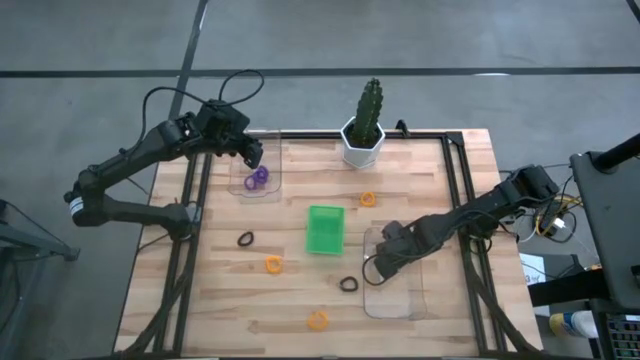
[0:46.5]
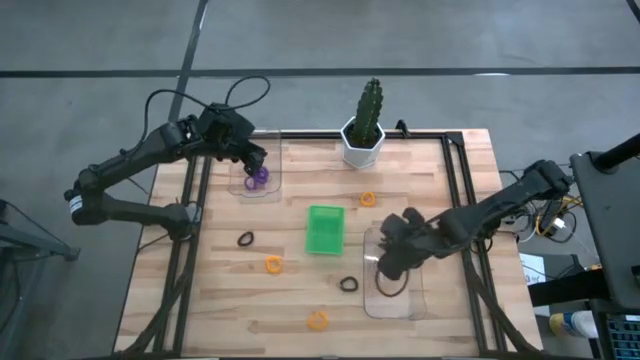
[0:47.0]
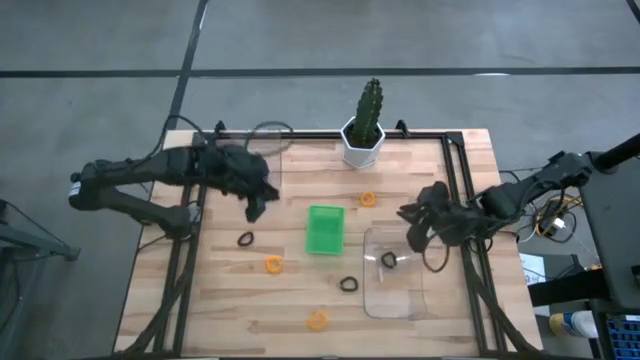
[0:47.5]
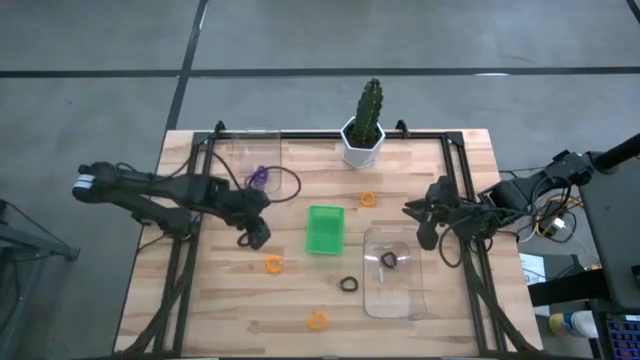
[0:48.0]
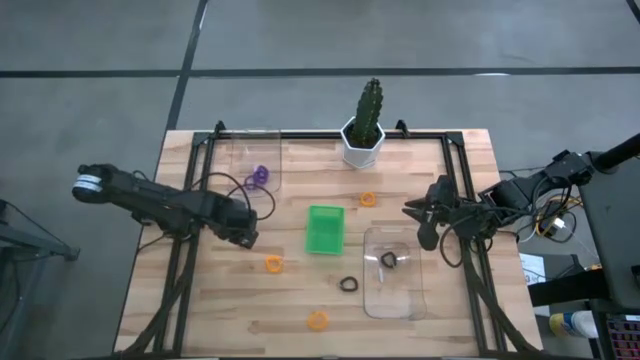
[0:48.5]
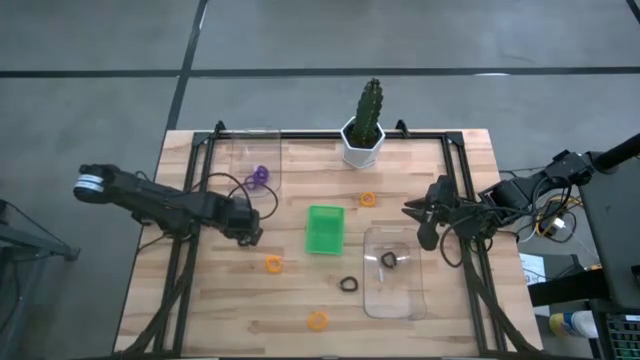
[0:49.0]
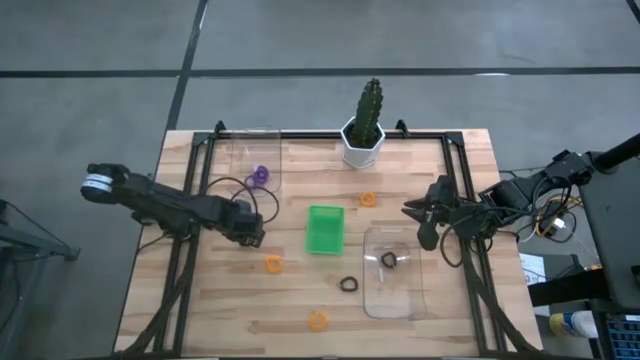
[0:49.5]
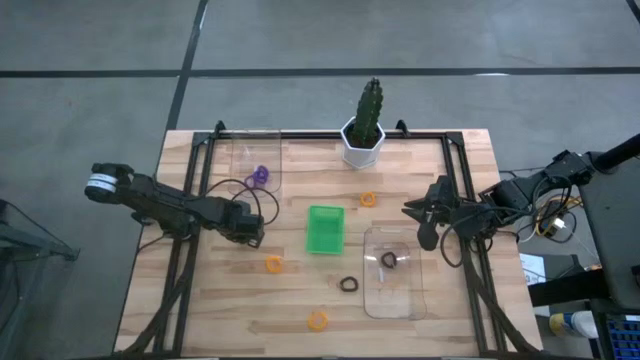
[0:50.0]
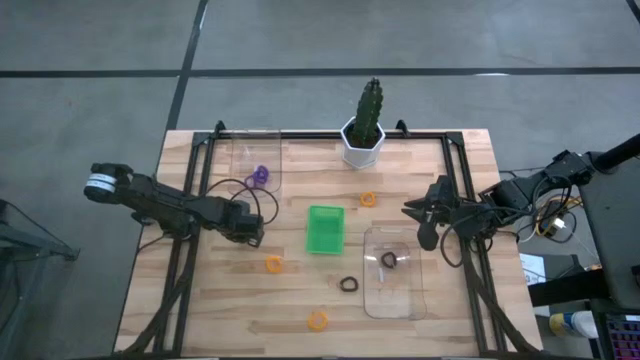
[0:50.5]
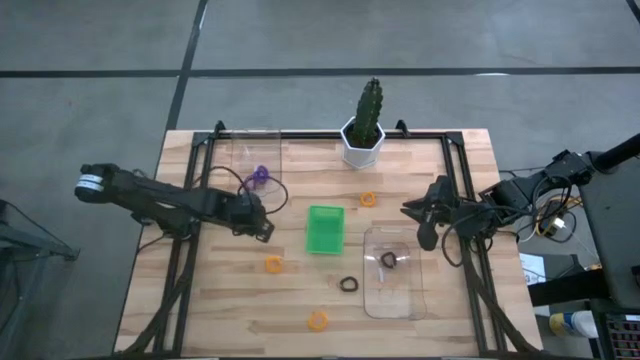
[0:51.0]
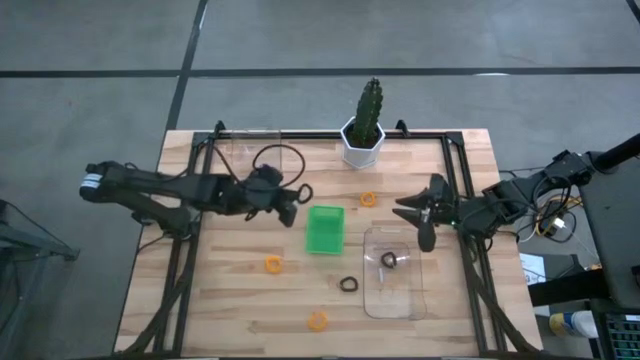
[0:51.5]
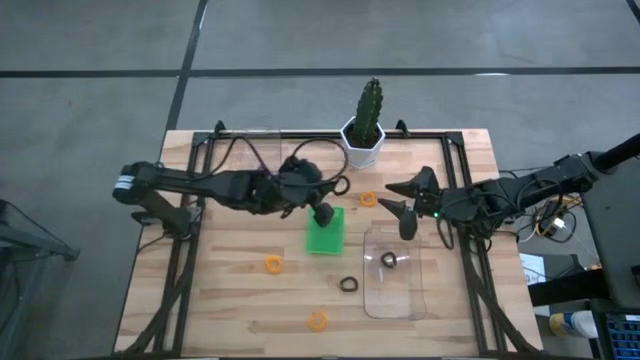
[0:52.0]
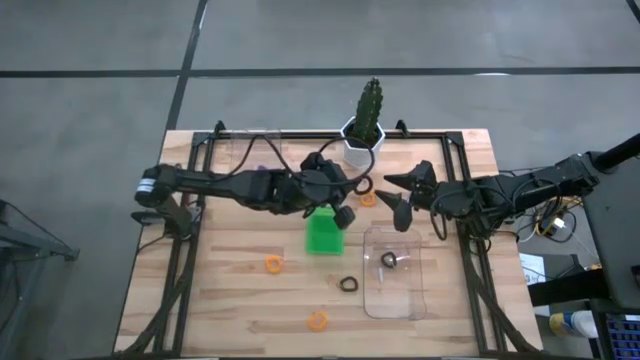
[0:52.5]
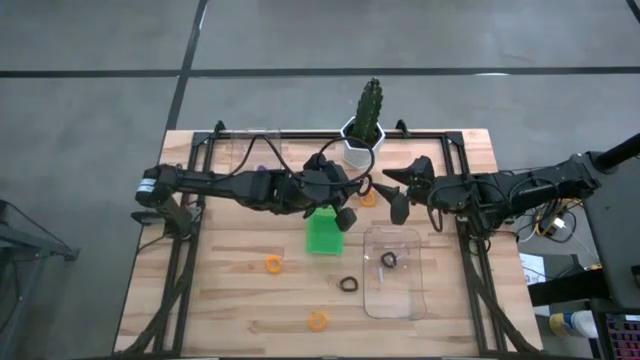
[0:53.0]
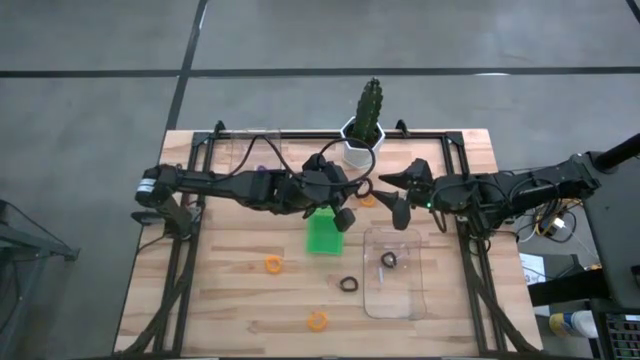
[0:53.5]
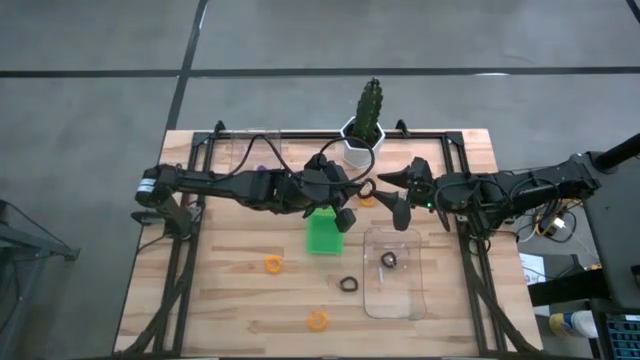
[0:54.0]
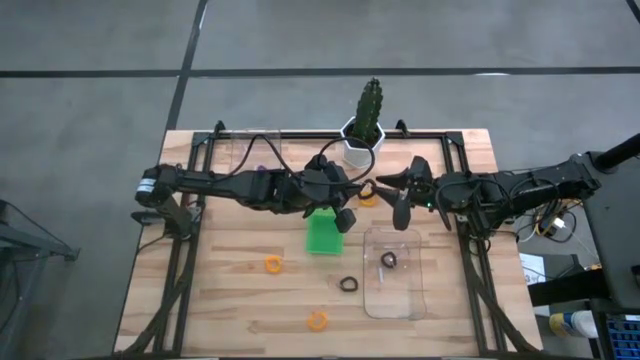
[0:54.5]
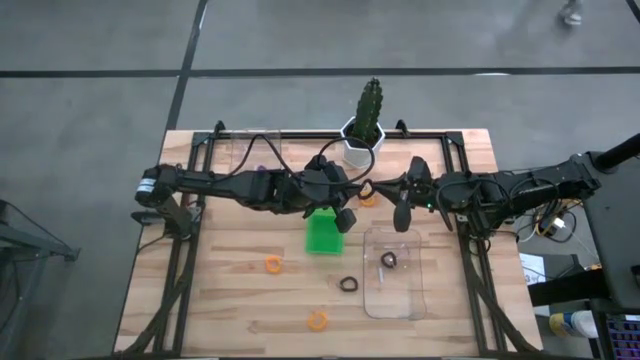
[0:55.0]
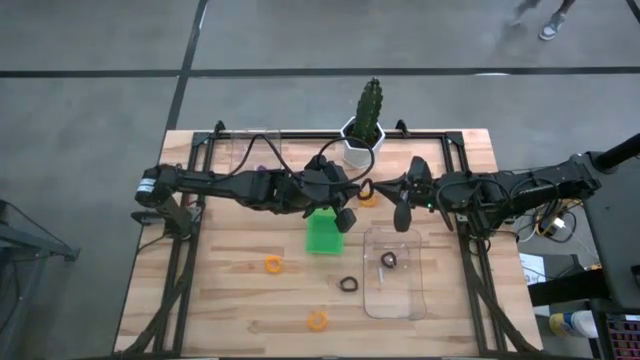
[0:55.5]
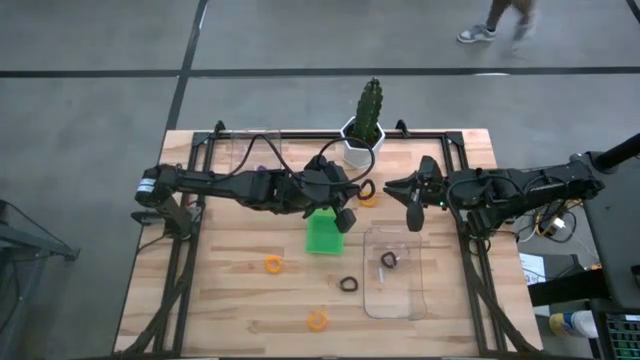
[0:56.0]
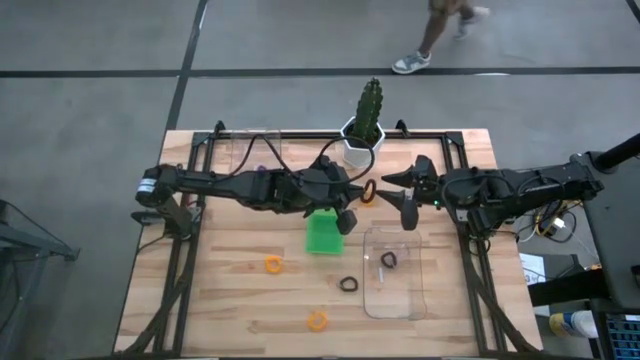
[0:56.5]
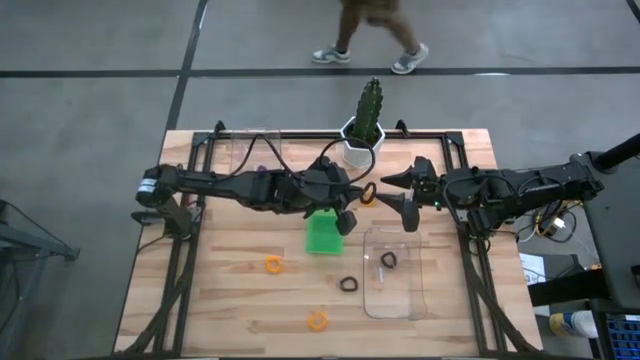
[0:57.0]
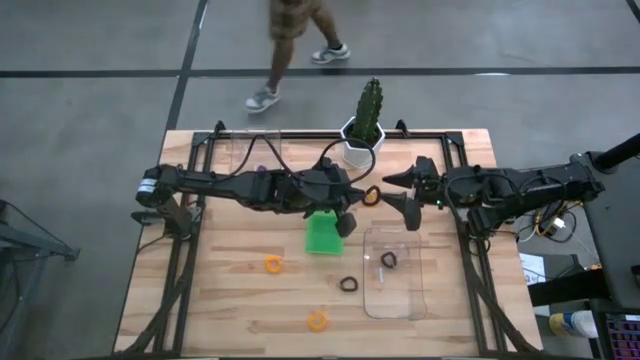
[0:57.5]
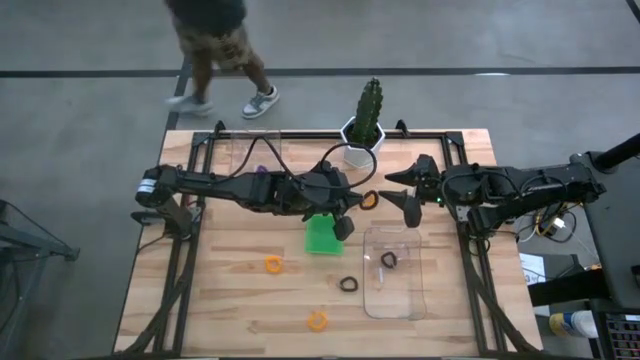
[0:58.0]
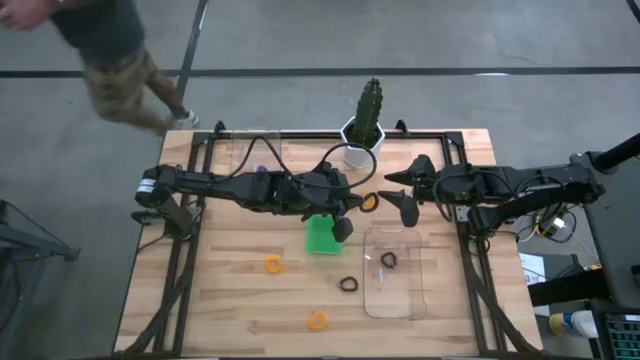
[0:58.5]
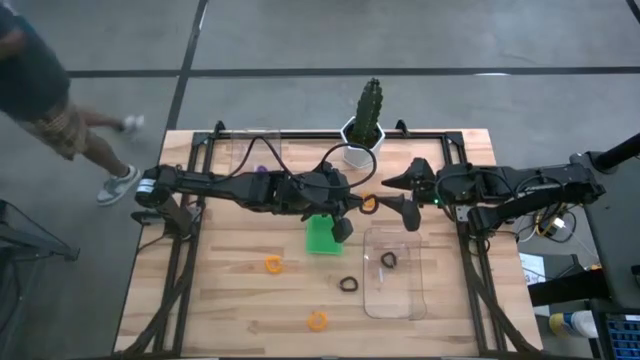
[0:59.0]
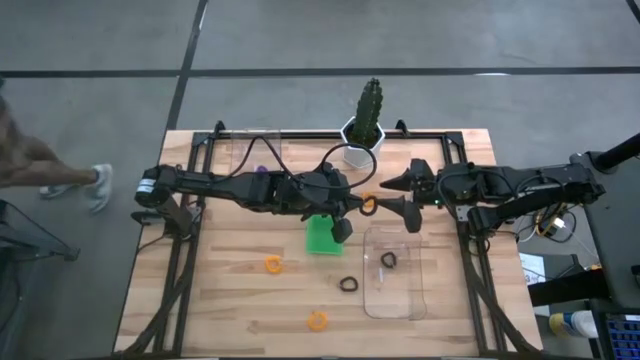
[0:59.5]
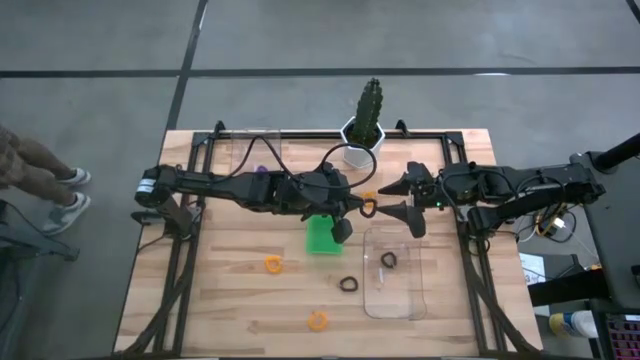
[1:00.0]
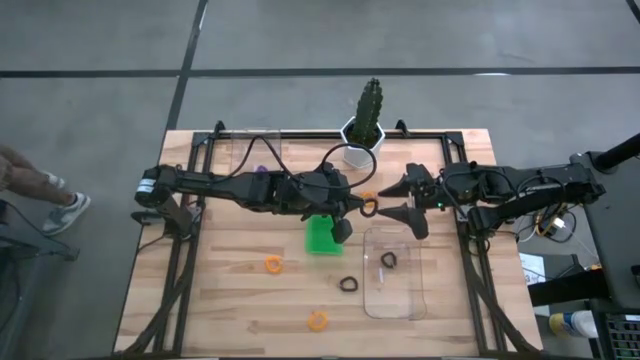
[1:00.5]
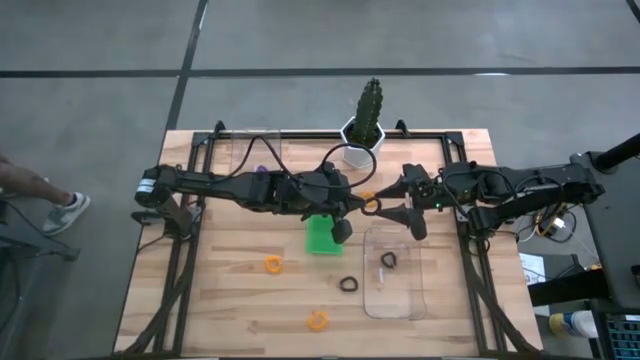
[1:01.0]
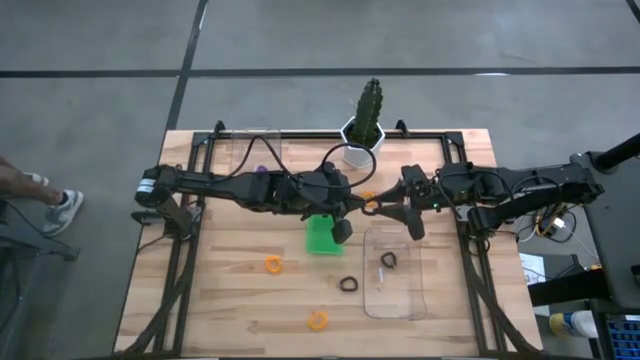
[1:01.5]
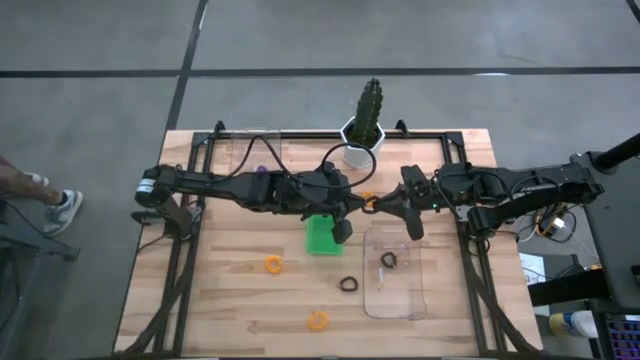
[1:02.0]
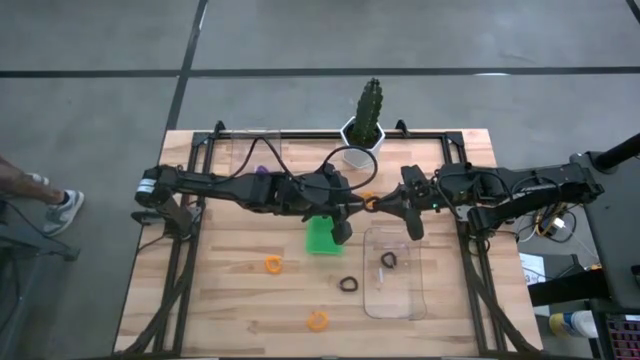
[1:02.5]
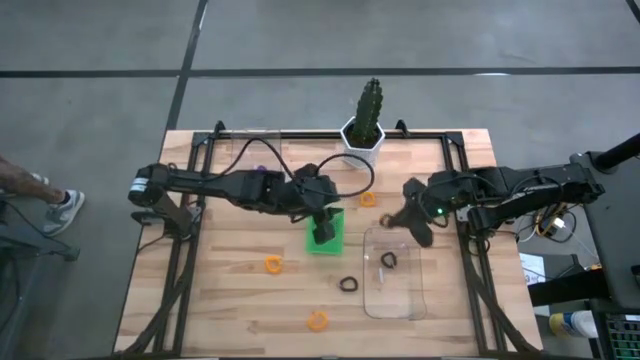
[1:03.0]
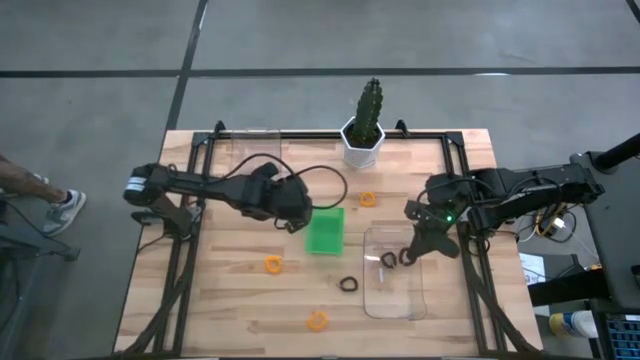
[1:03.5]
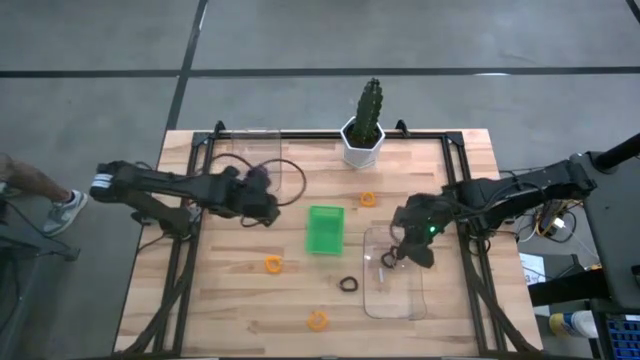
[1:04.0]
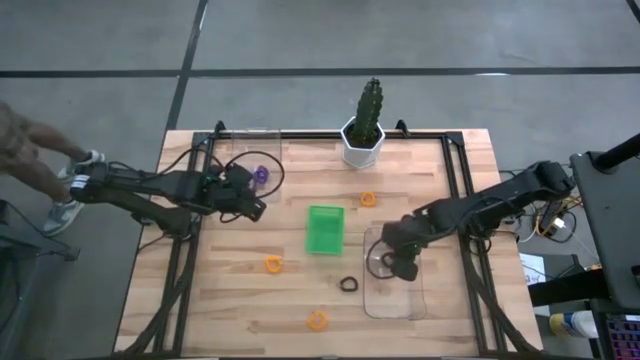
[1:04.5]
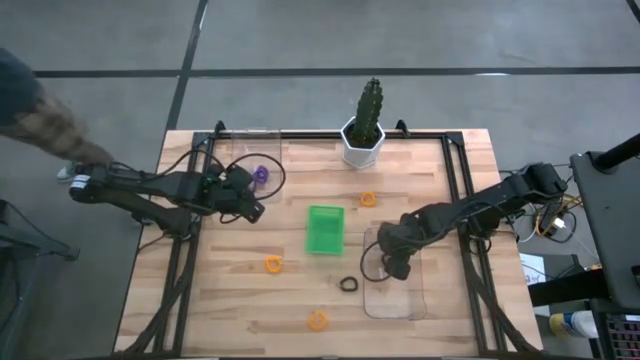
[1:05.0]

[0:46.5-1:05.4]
Task: Sort spring keychains
Put the top black spring keychain into the bottom transparent bin

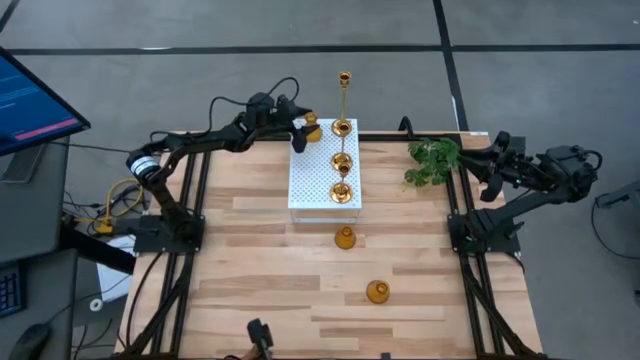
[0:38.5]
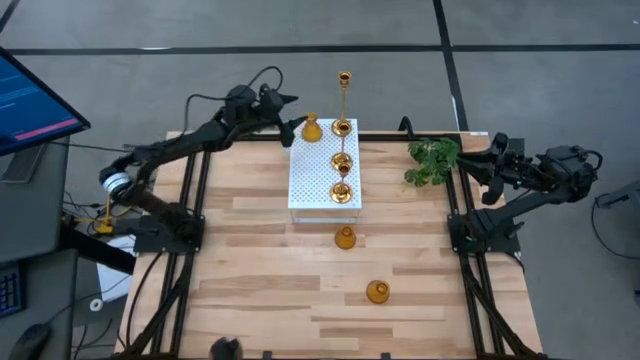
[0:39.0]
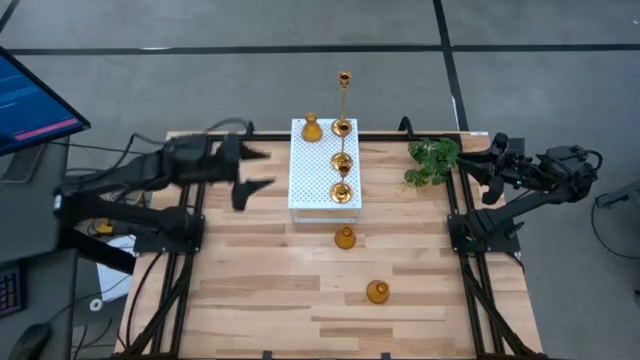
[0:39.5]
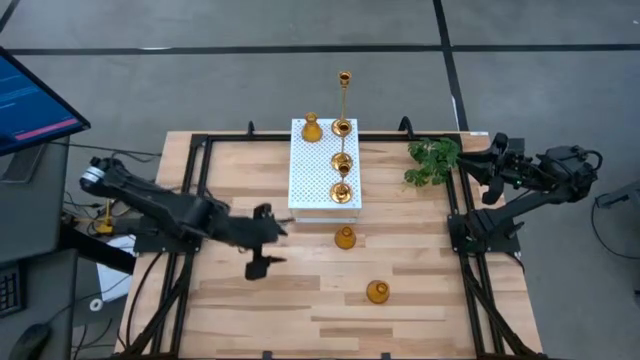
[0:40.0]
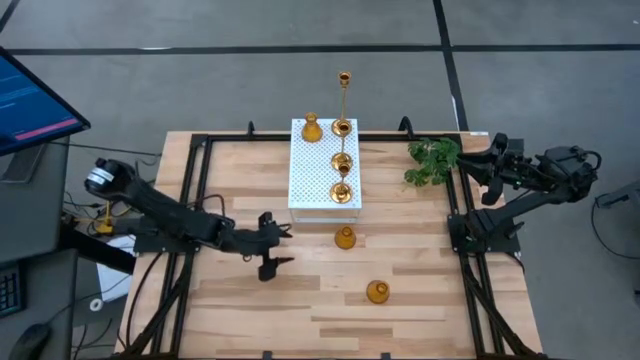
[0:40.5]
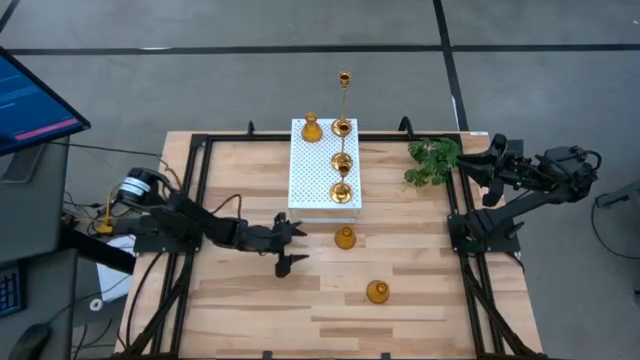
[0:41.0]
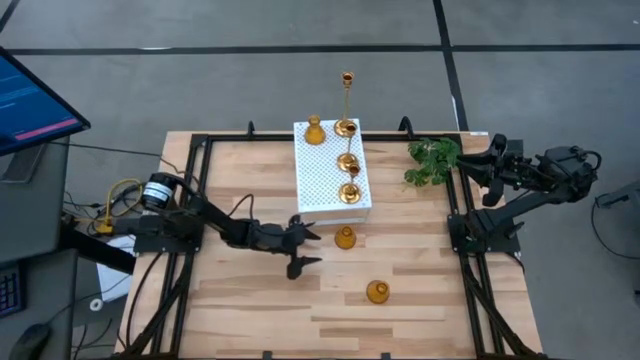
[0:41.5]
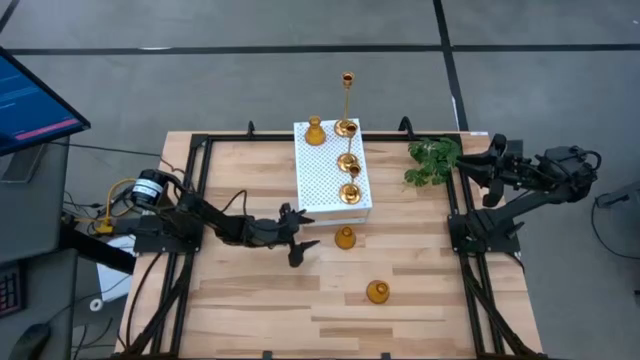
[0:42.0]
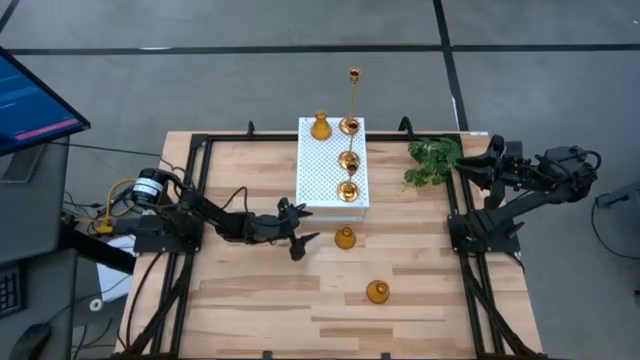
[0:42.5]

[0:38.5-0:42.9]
Task: Pick & Place candle stick holders
Adjust the shelf
